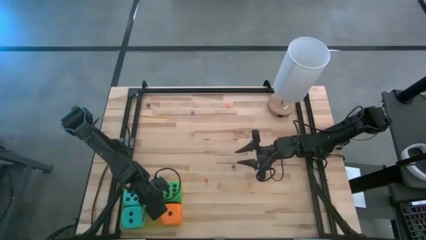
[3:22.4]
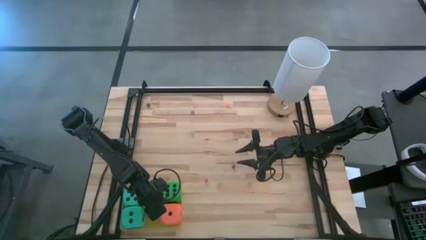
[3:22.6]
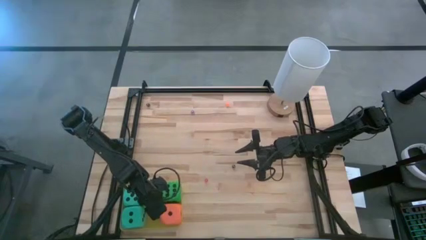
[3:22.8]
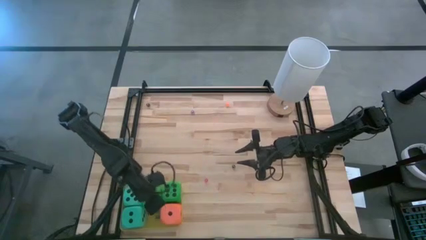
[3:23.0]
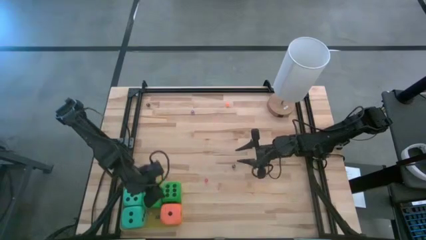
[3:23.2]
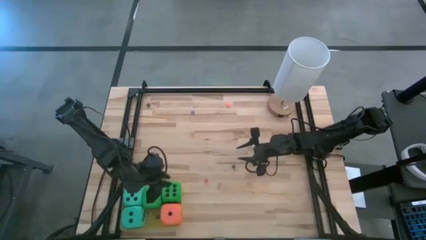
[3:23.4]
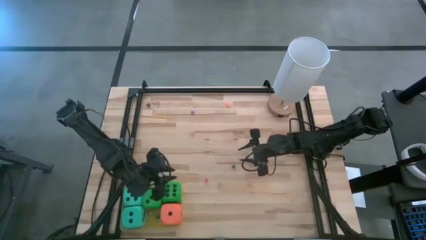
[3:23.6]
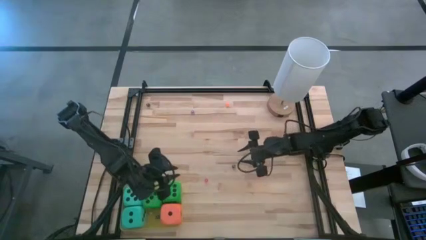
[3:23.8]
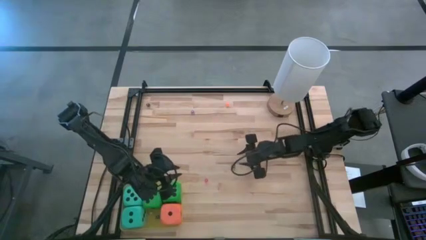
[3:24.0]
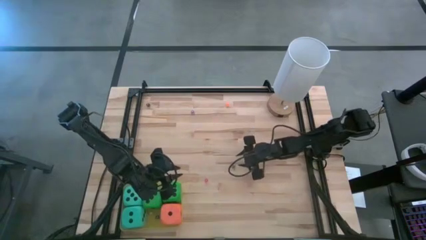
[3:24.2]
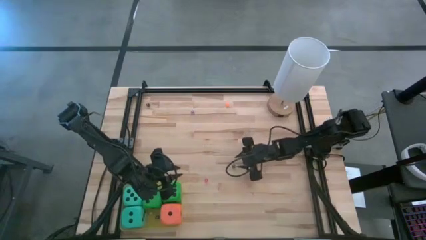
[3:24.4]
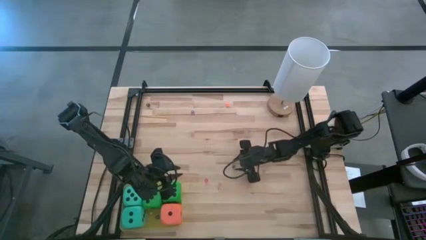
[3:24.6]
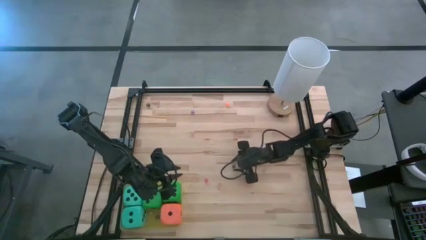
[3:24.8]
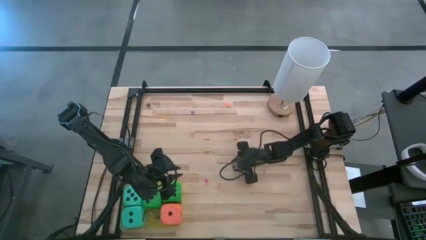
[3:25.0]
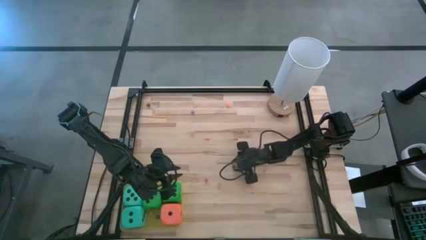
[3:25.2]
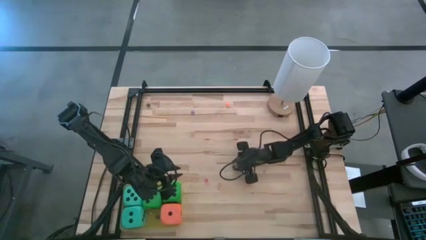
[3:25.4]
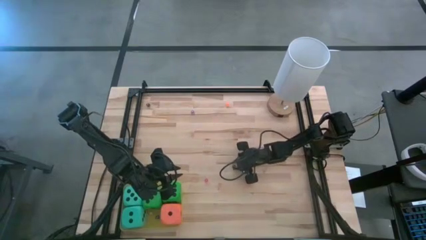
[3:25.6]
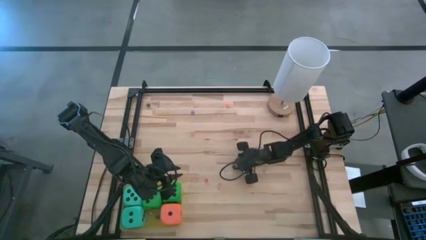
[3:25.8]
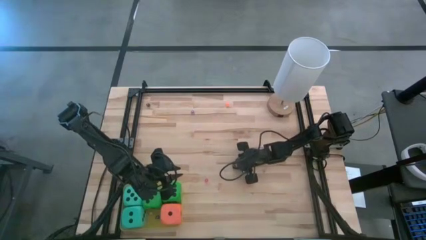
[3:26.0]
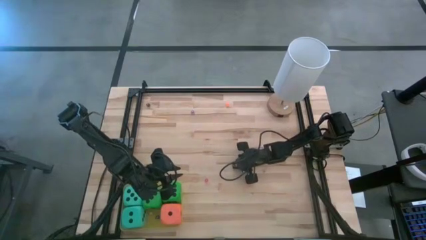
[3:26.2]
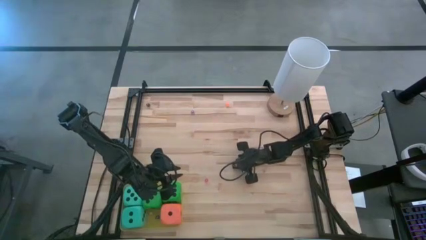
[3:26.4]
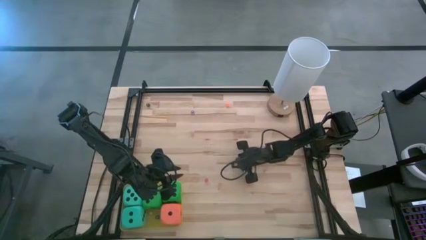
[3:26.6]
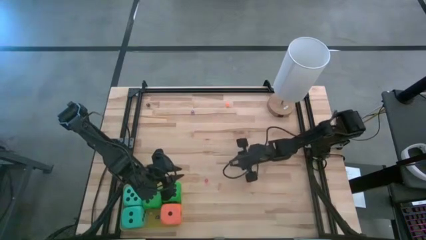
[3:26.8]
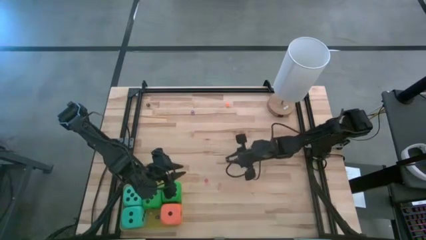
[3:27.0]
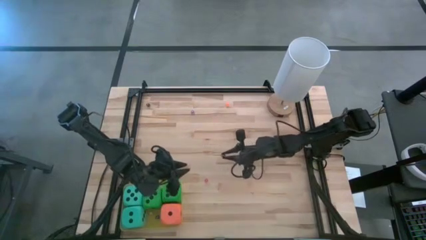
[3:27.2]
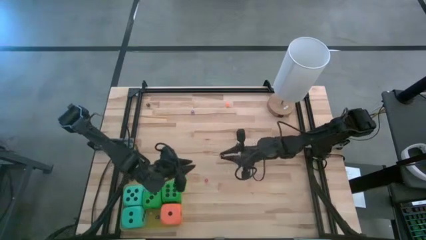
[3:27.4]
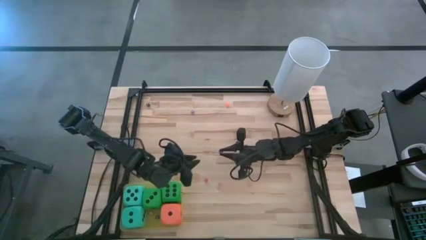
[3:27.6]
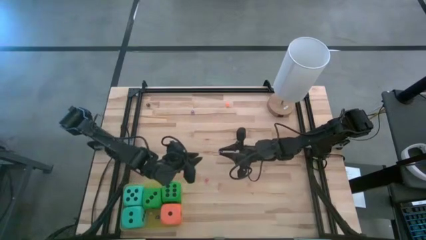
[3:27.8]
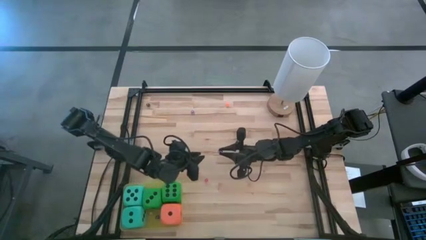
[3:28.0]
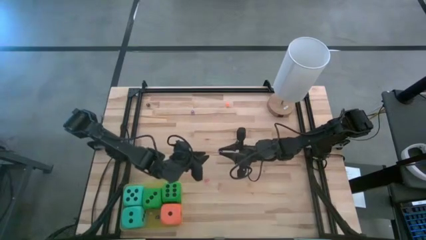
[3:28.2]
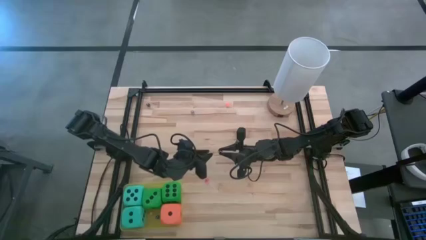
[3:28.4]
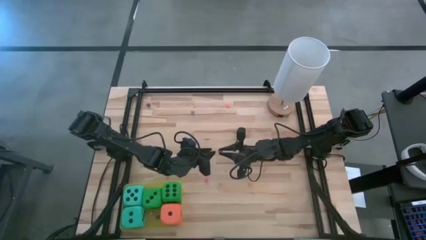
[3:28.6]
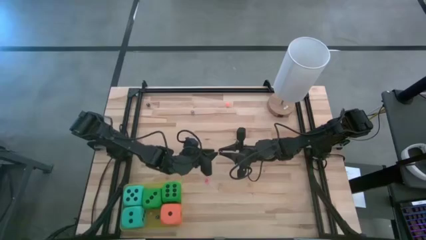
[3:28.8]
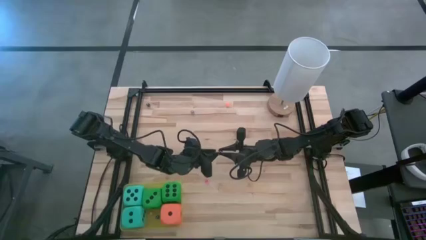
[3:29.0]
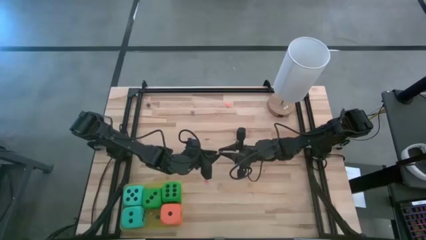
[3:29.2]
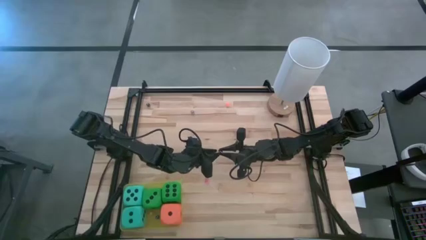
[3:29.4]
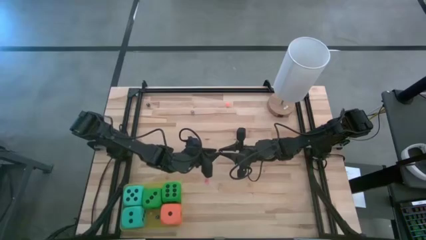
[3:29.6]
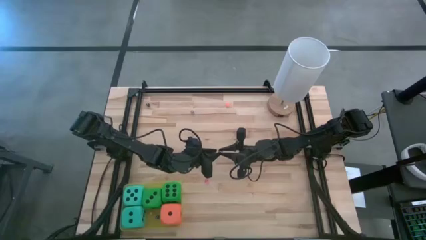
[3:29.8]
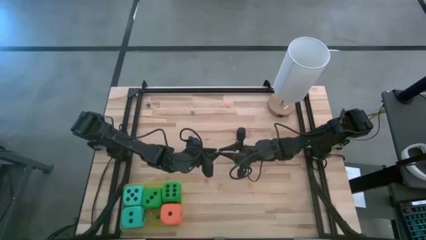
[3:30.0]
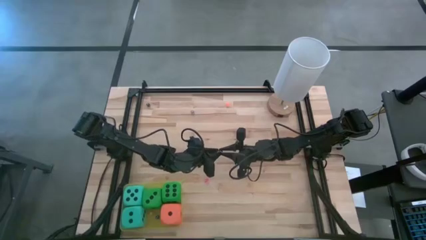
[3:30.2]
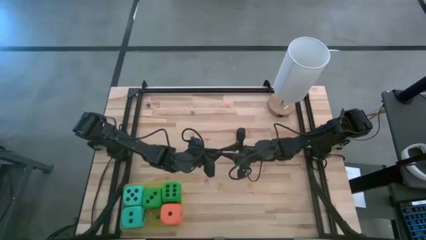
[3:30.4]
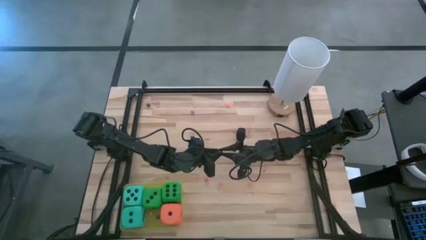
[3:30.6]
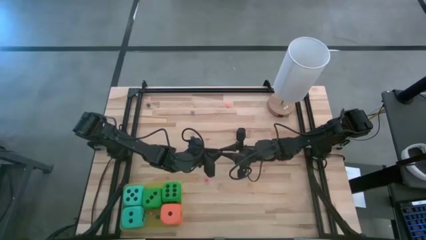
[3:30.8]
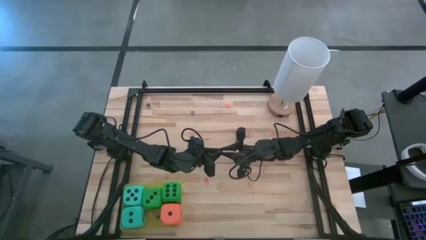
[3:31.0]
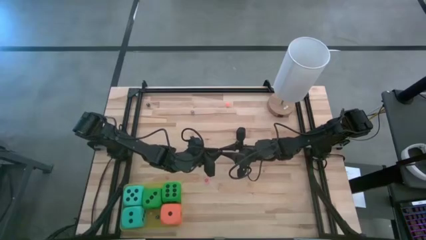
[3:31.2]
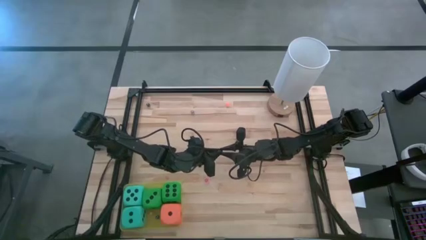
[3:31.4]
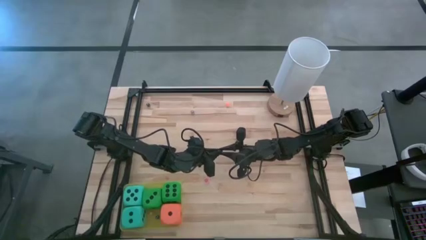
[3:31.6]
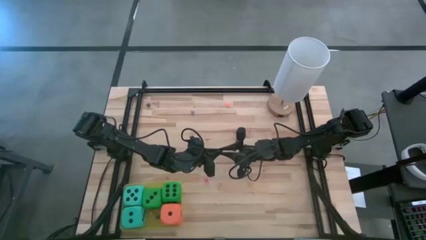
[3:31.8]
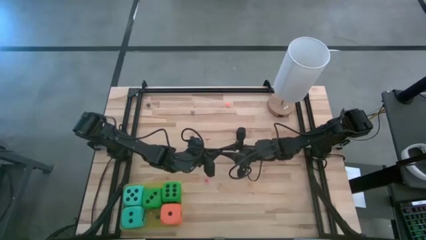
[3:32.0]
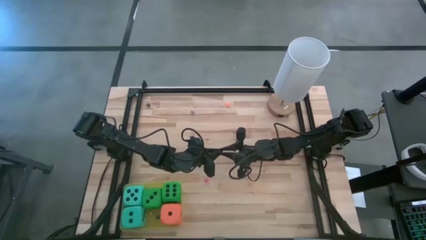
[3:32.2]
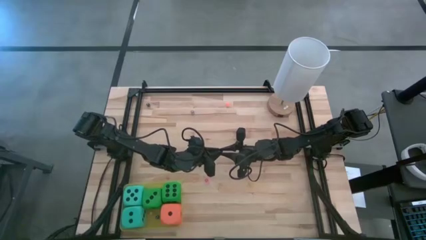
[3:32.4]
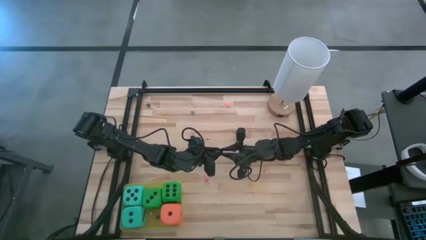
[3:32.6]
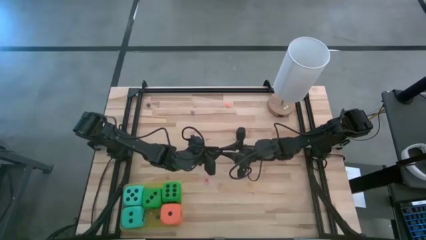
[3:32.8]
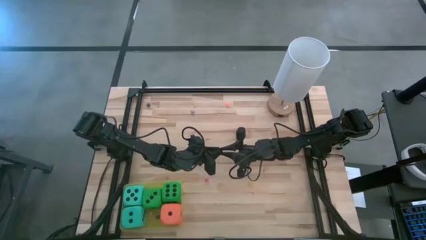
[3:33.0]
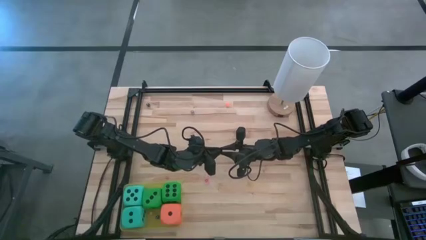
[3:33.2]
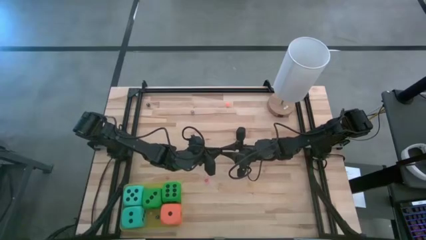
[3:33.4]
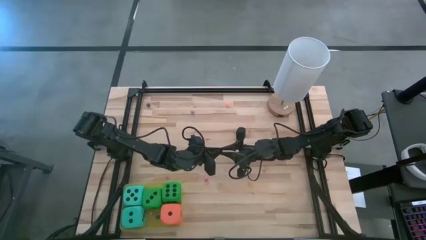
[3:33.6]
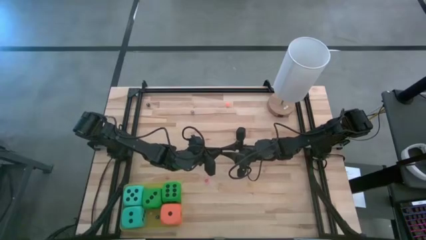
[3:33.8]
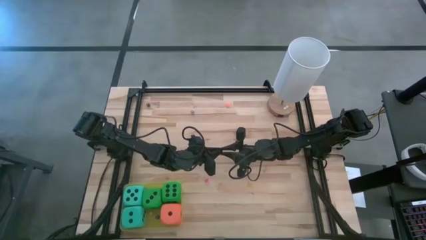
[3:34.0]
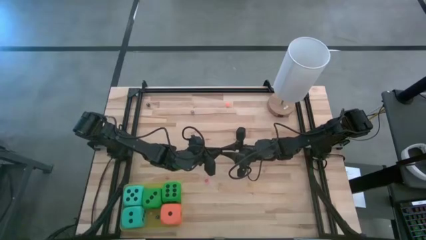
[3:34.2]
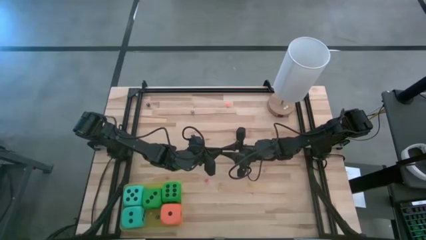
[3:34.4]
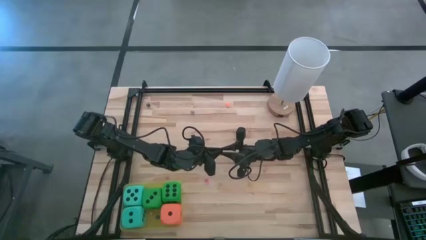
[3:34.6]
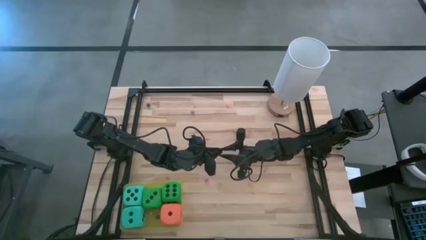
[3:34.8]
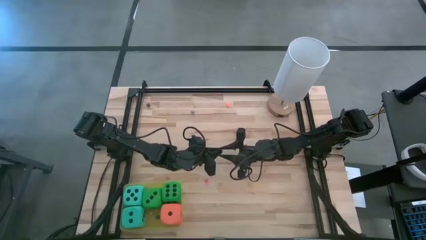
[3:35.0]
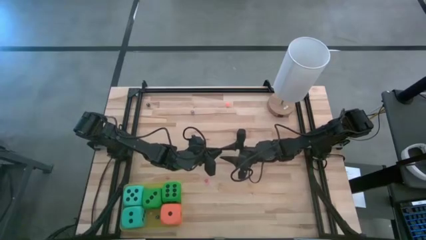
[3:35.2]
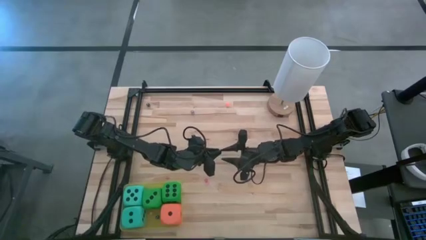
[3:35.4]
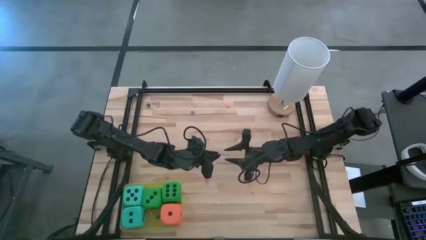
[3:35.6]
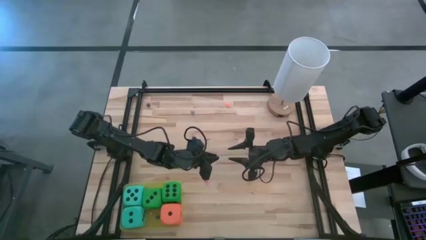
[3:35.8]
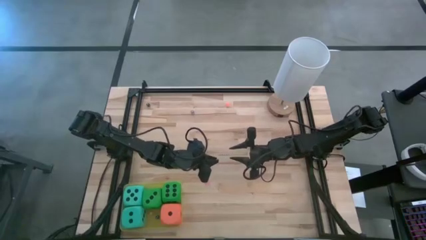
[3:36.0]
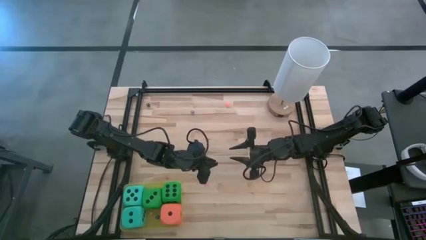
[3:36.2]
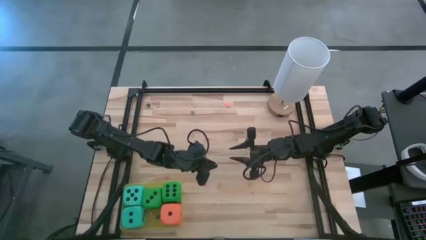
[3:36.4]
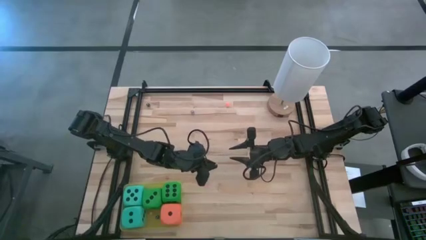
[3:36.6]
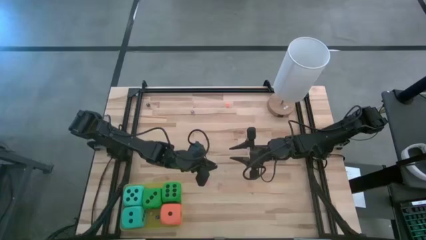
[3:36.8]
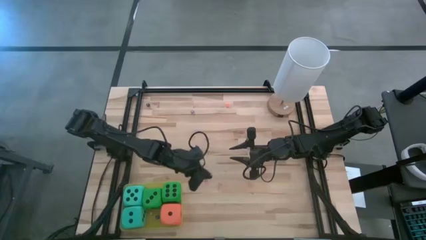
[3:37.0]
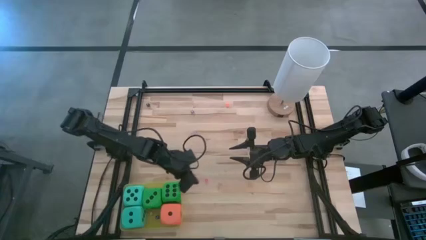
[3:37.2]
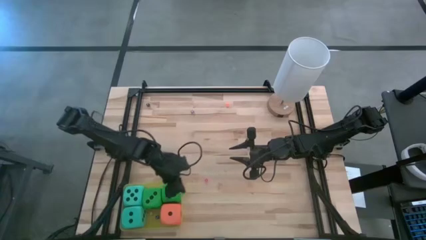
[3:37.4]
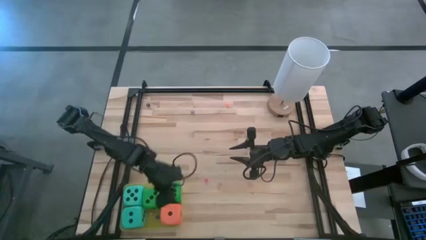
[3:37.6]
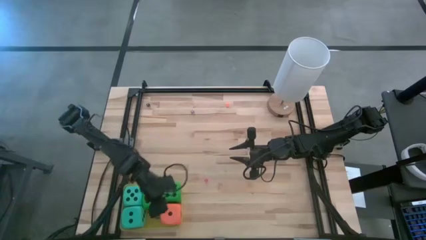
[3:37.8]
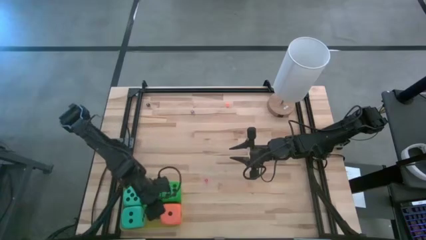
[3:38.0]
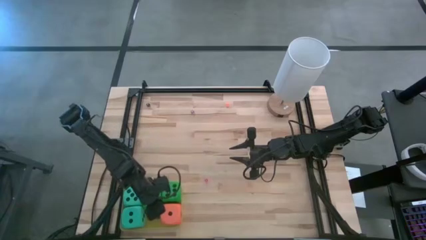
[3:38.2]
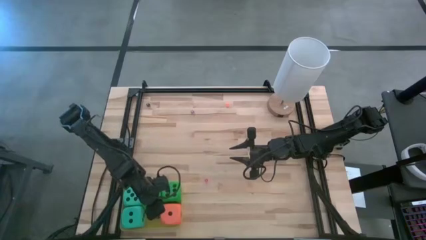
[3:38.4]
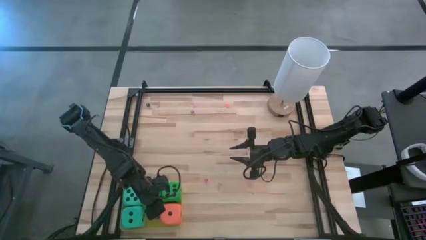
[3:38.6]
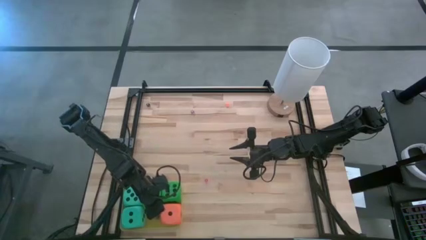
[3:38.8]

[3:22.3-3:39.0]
Task: Pick & Place Dice
Put the bottom black dice into the yellow bin
